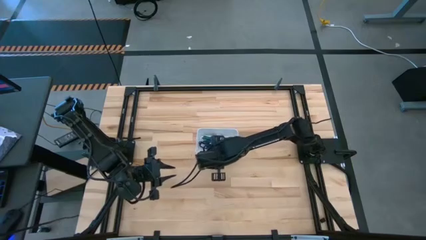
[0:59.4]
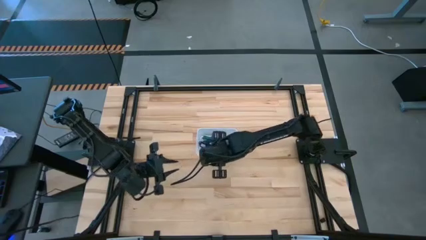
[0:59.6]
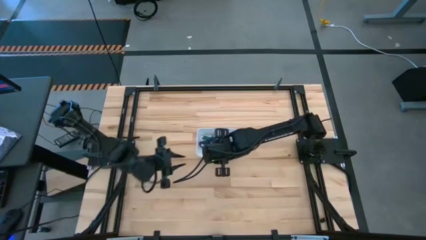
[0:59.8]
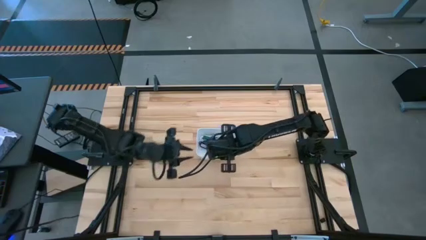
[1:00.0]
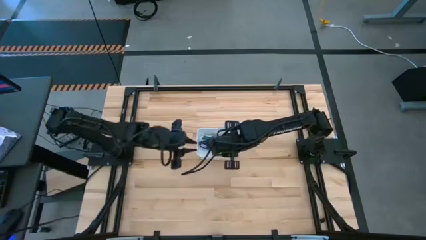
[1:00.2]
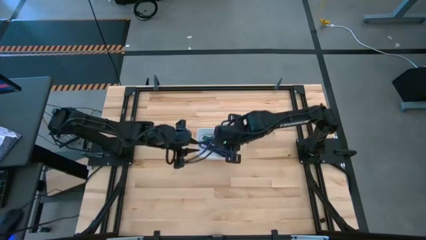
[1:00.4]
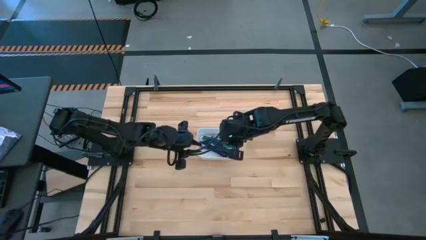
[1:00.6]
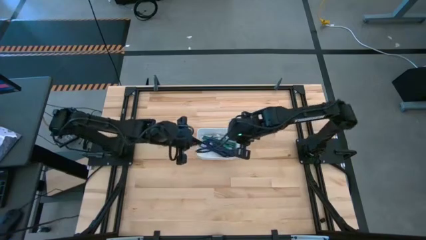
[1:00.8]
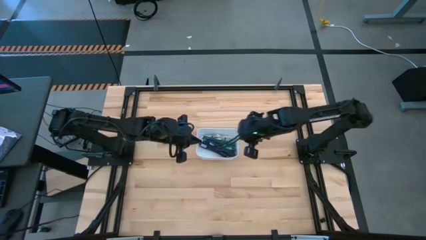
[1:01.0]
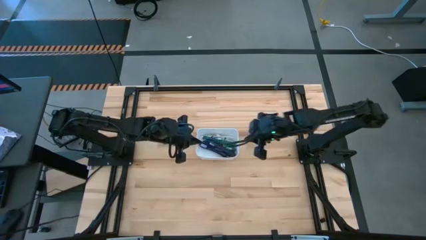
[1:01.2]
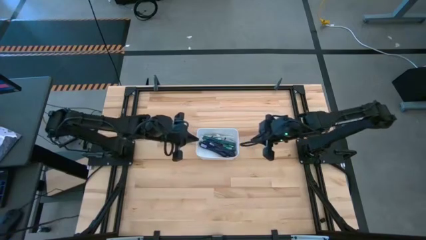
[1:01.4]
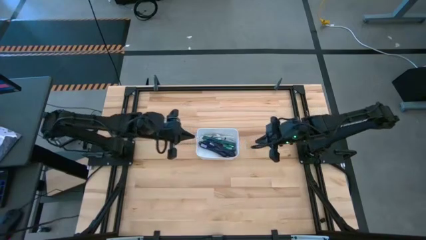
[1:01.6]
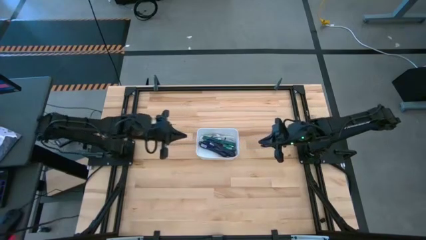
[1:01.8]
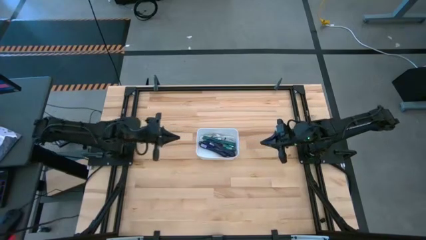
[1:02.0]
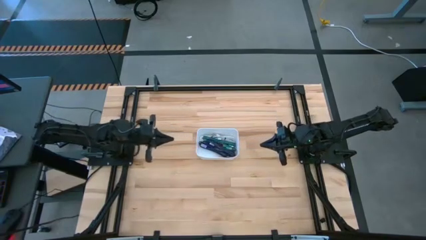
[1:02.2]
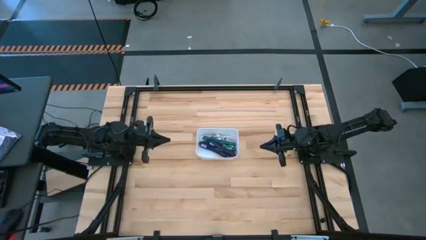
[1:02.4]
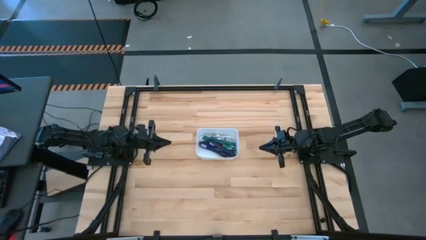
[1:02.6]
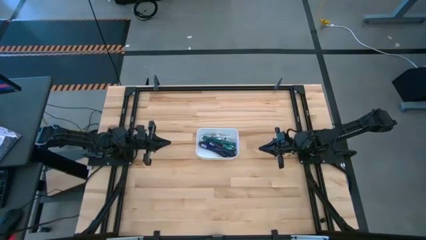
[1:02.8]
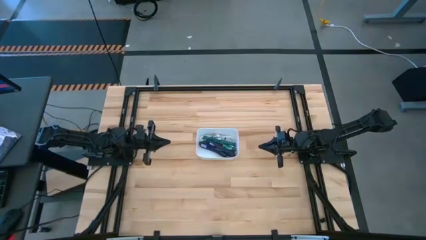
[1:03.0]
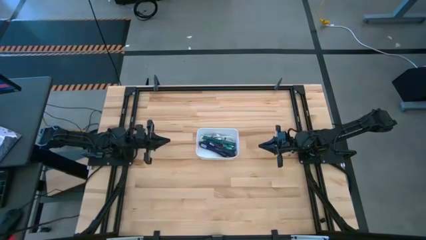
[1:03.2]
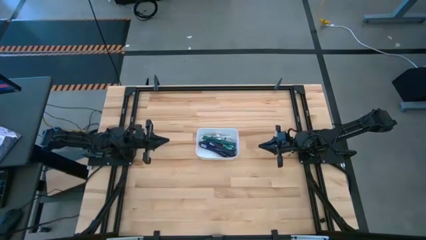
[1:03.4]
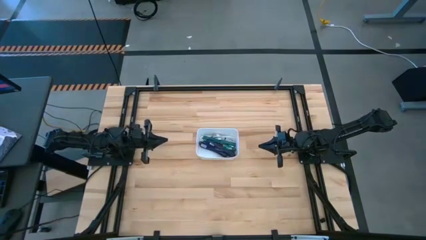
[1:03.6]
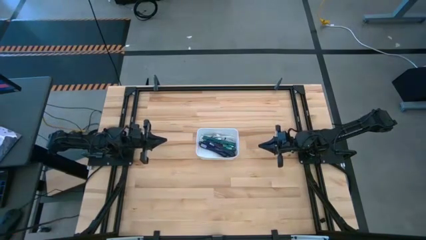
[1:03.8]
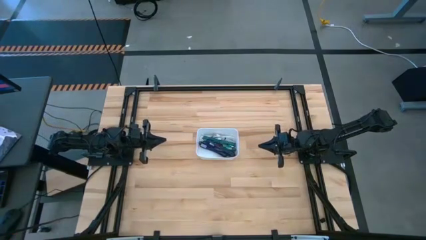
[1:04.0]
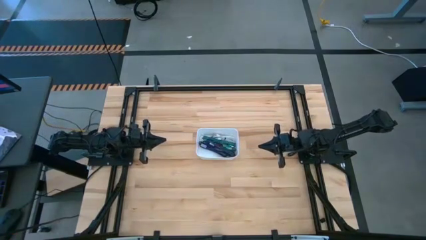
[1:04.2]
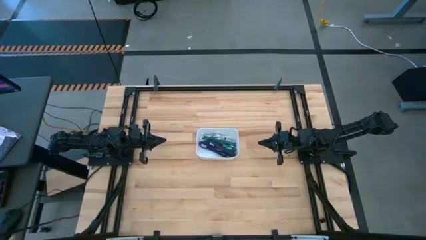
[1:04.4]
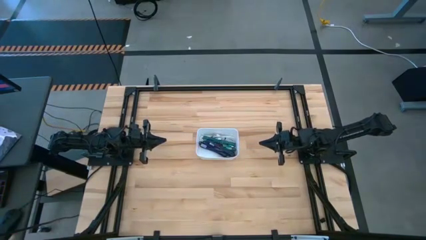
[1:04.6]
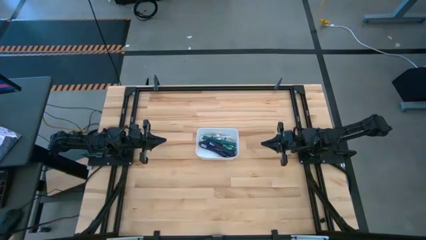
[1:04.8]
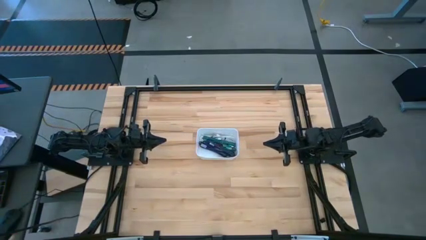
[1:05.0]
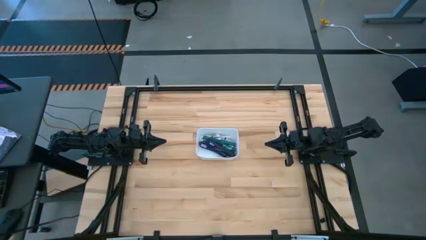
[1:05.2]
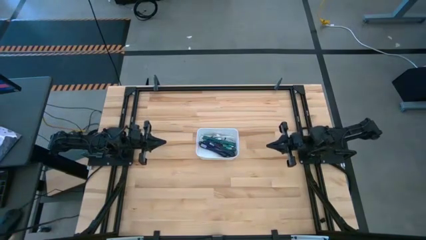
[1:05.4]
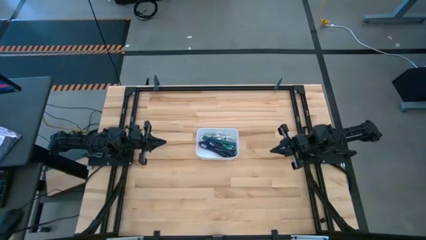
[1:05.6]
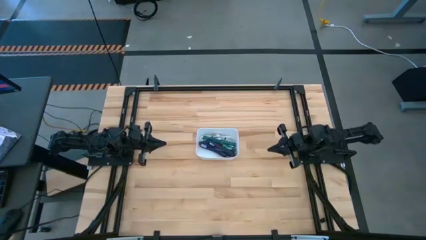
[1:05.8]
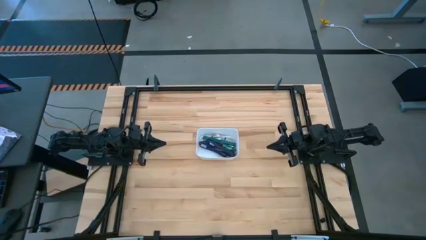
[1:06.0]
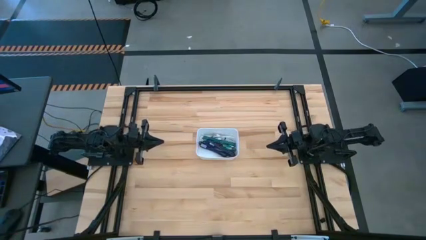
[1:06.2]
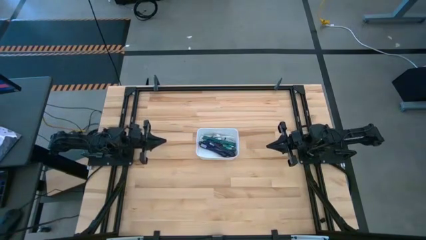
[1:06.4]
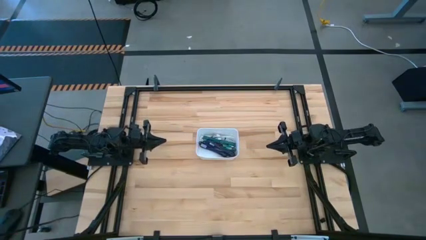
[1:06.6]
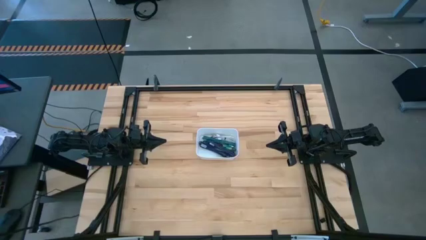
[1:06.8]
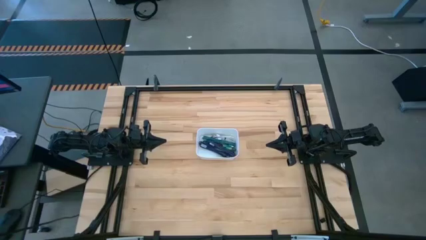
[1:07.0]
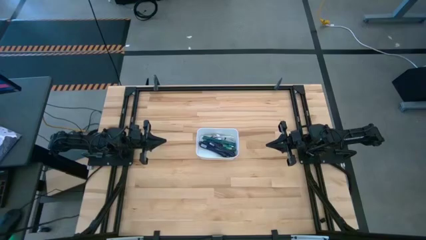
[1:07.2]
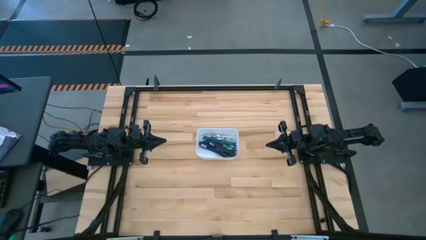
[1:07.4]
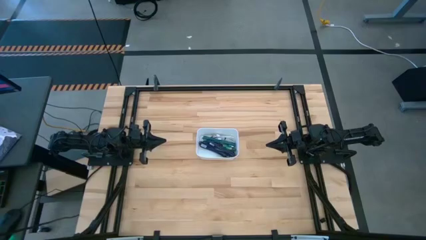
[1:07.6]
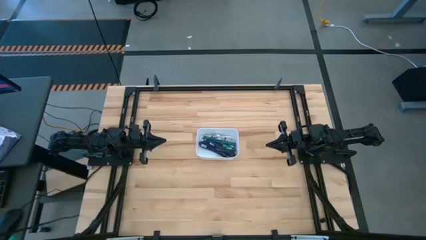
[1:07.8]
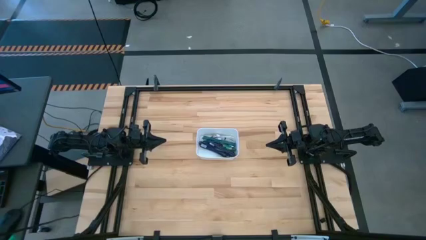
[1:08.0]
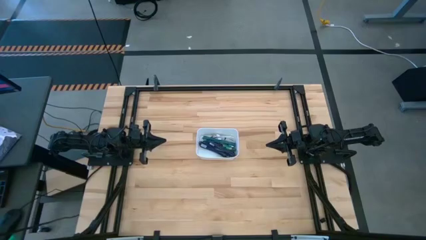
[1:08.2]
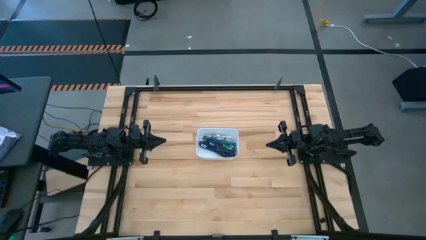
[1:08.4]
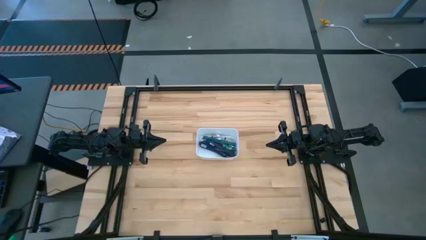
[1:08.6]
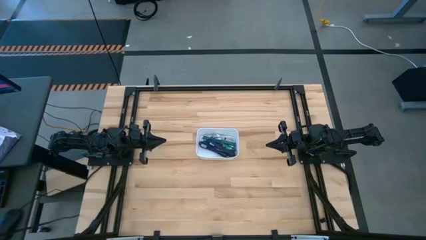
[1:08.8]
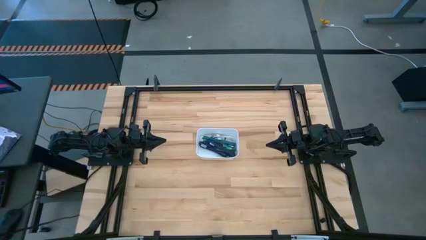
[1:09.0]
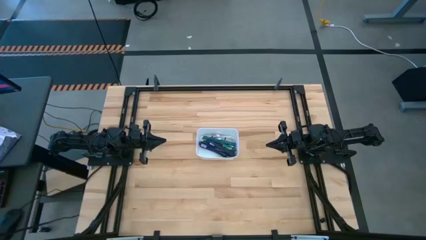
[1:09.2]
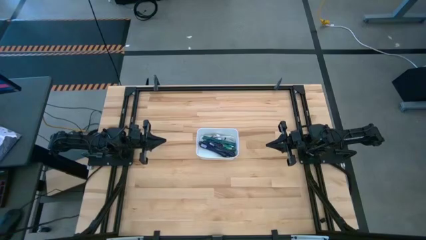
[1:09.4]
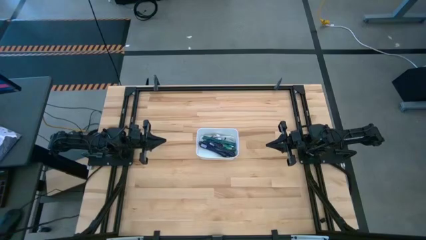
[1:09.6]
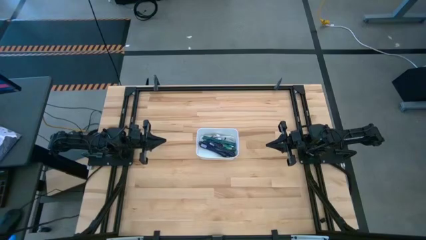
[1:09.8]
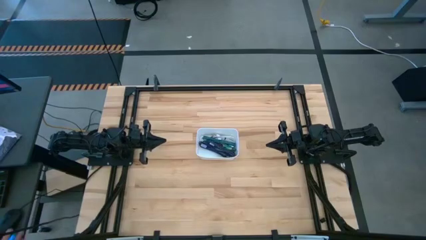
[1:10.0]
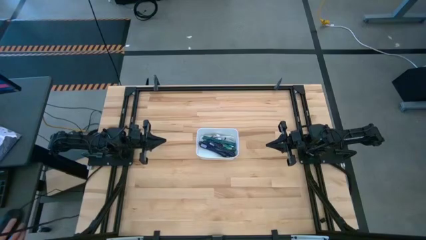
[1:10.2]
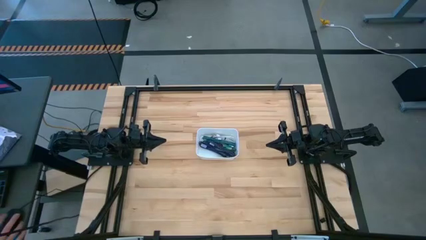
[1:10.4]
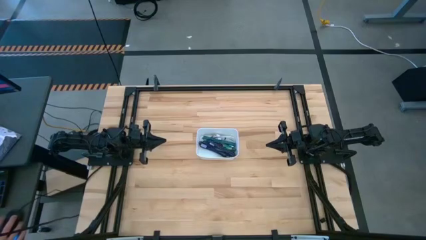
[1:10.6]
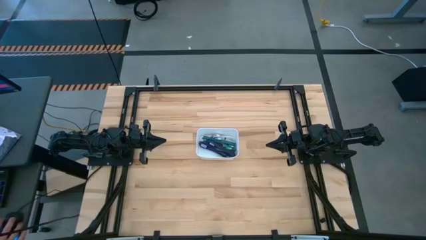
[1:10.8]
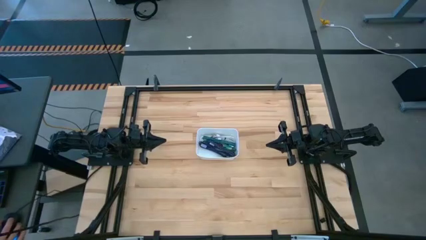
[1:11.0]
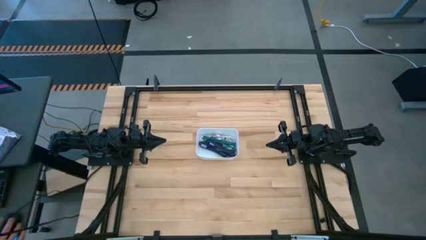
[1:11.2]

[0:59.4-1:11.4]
Task: Pick and place USB-C Cables
Return to Home Position
